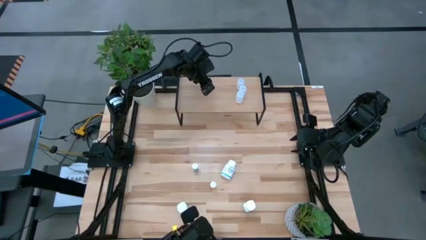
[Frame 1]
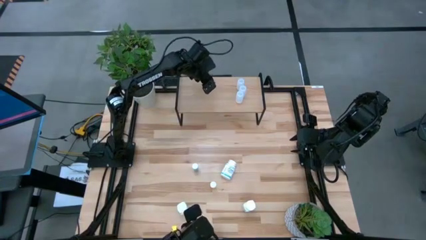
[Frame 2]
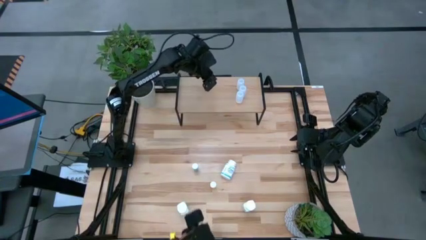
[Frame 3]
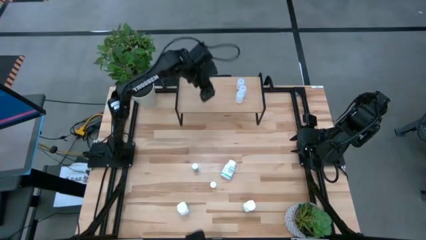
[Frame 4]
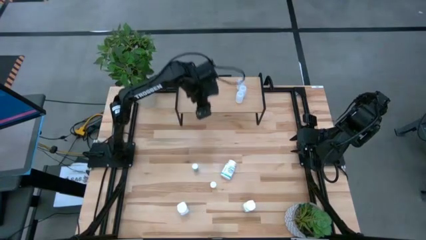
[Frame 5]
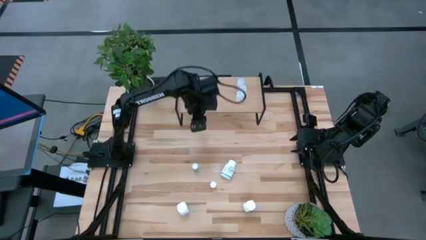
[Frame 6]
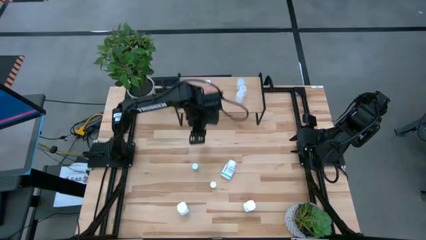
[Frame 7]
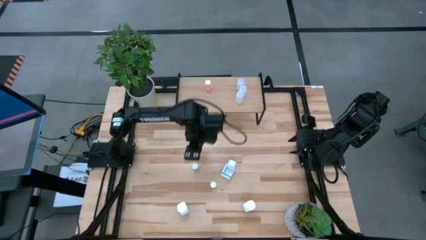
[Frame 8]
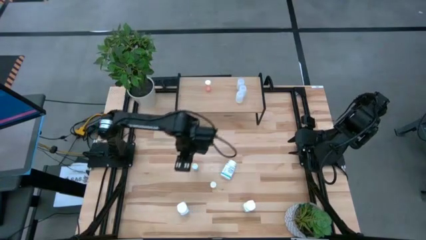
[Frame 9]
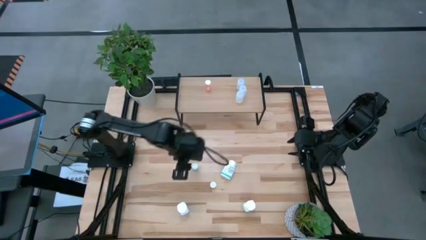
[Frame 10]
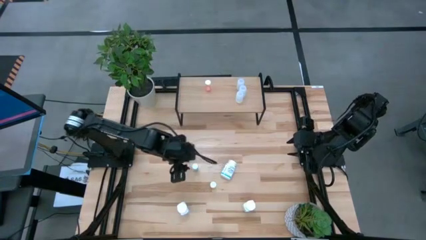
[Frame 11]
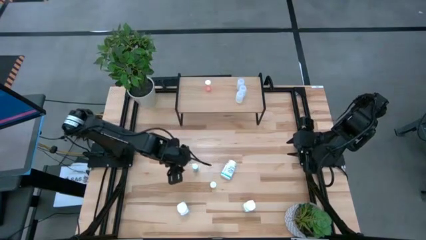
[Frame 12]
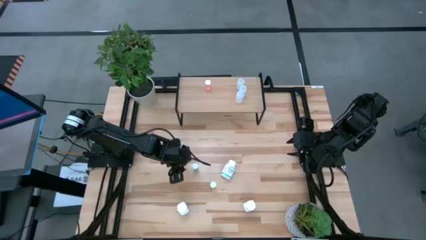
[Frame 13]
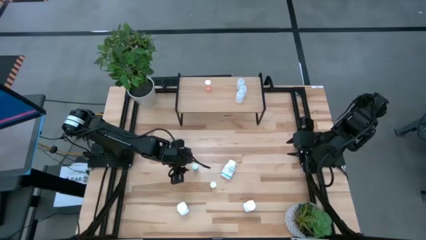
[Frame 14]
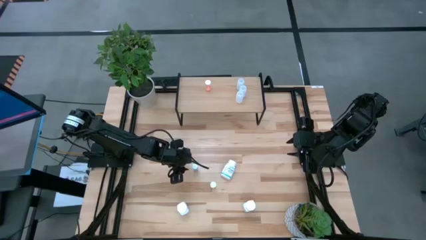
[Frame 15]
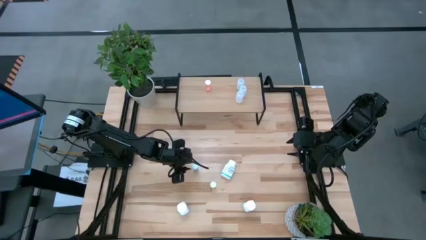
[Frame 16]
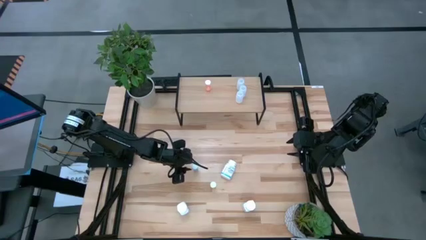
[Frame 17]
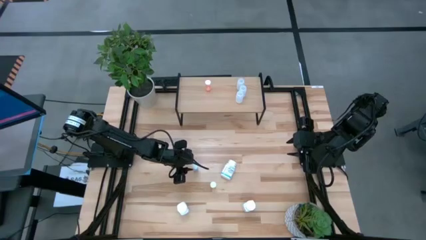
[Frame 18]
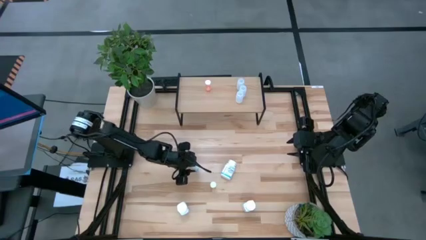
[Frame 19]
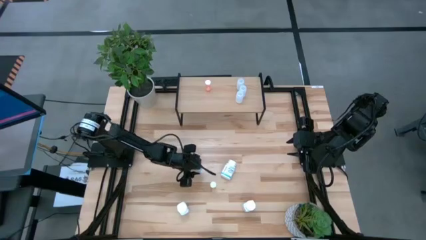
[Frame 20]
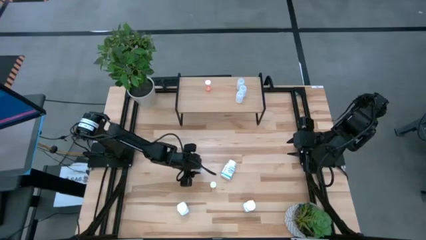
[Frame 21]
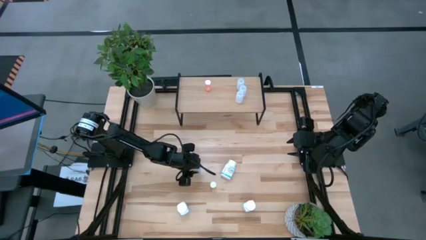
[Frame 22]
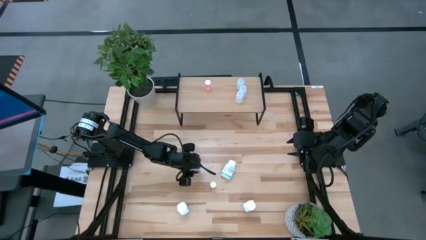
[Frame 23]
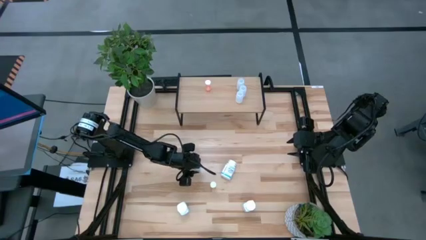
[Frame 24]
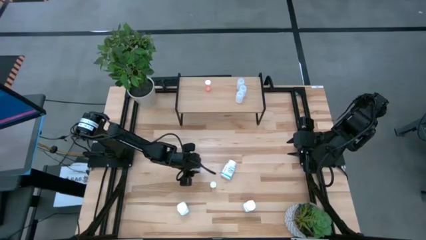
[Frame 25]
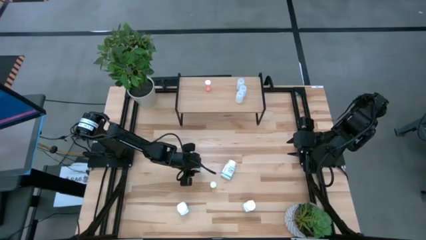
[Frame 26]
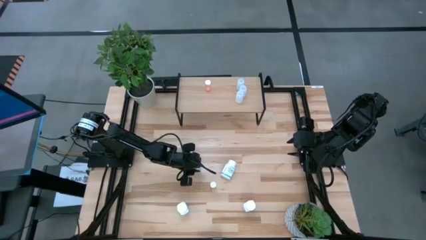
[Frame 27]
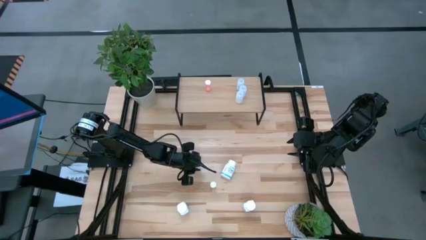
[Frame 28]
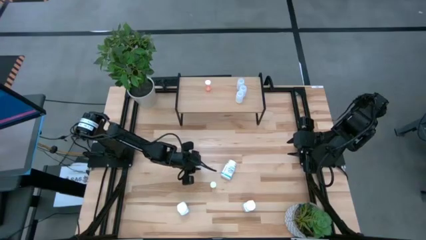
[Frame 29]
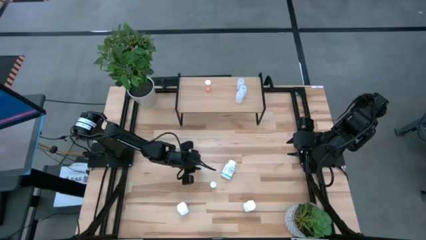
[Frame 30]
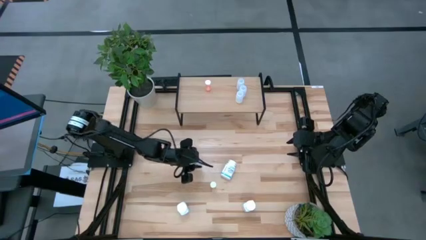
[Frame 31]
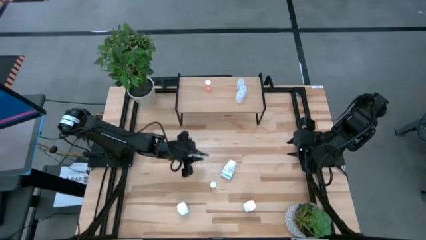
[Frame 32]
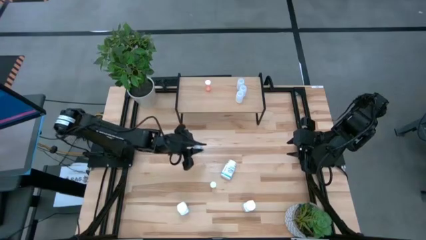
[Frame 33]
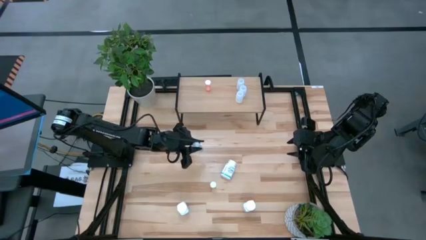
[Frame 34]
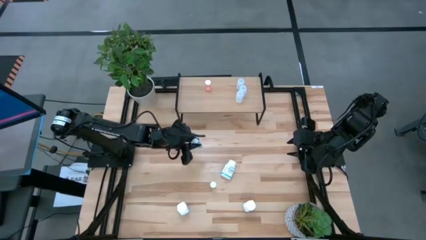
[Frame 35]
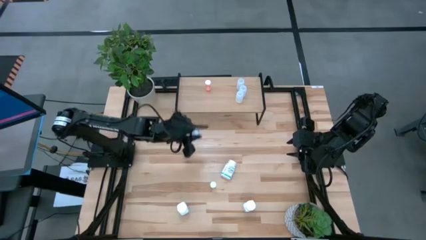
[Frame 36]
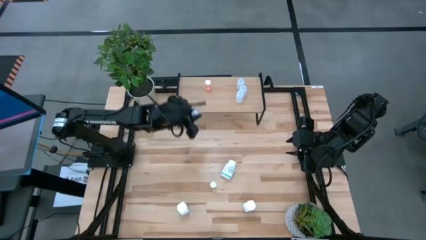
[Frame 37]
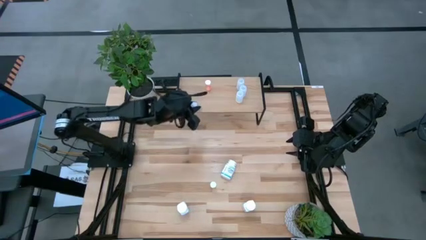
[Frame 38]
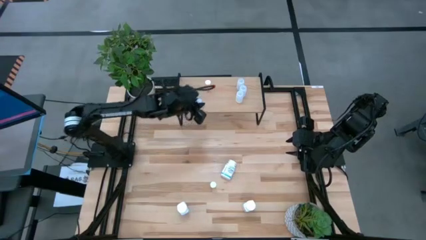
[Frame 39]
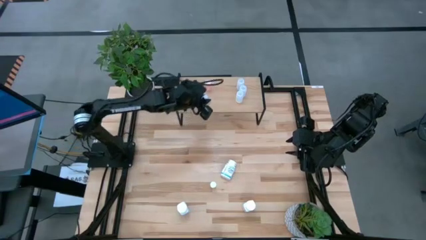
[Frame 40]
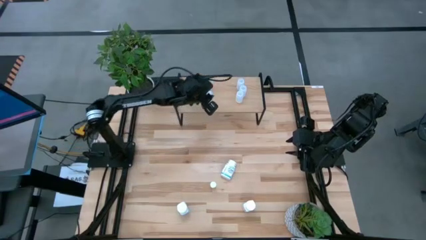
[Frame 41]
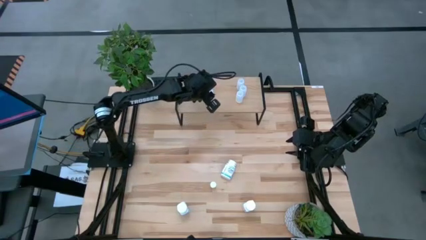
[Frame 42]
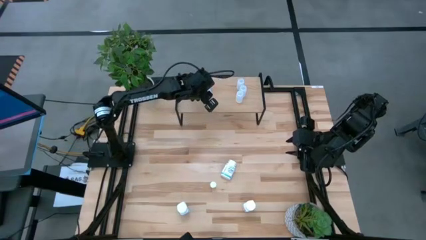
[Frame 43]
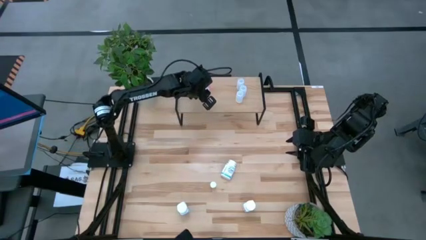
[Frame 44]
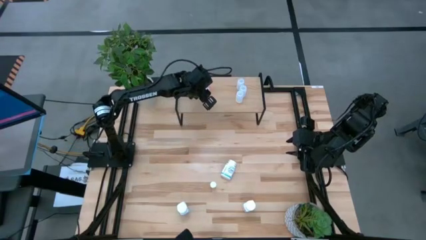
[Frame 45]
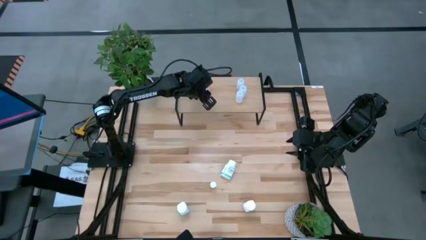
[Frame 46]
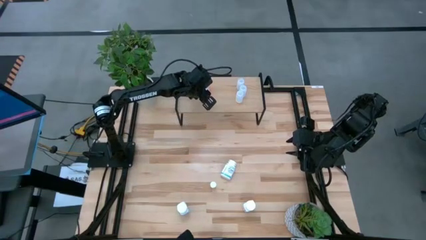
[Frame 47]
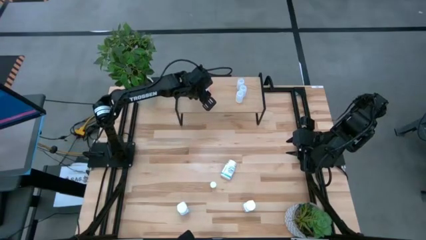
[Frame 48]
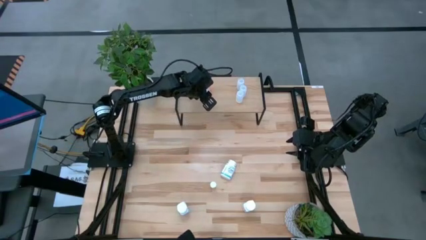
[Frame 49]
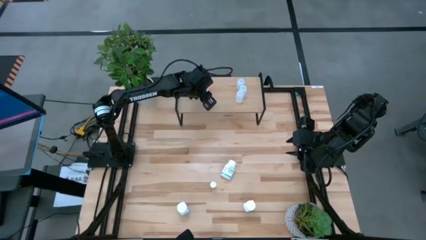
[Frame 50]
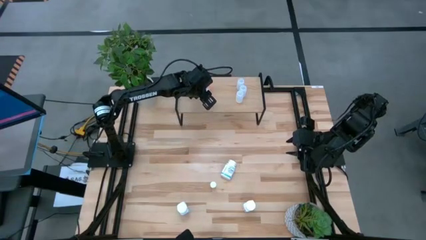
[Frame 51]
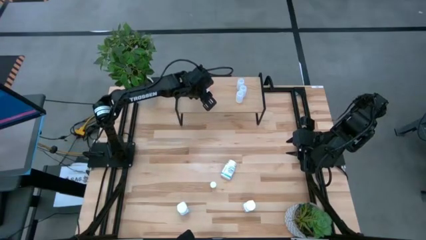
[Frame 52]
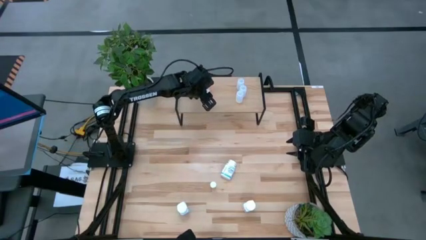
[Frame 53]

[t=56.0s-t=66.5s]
Task: Pick and place medicine bottles onto shelf by color
Put the blue pill bottle on the shelf

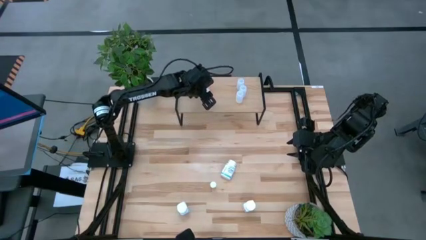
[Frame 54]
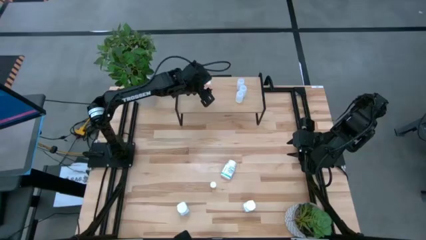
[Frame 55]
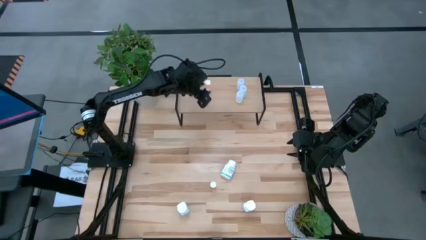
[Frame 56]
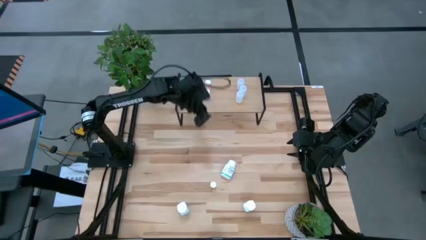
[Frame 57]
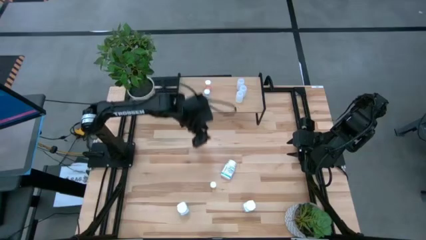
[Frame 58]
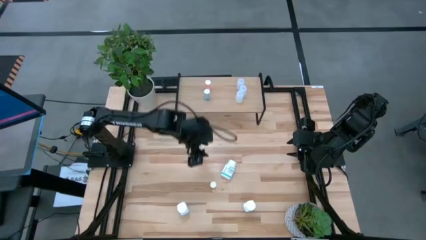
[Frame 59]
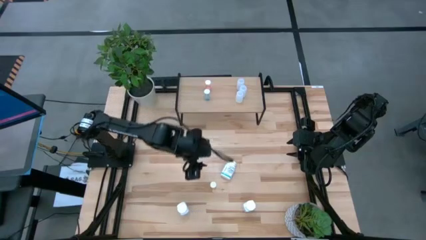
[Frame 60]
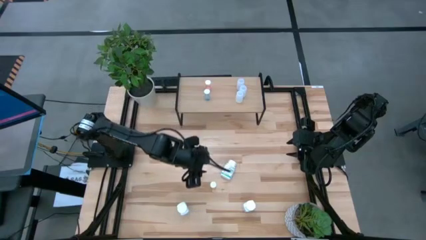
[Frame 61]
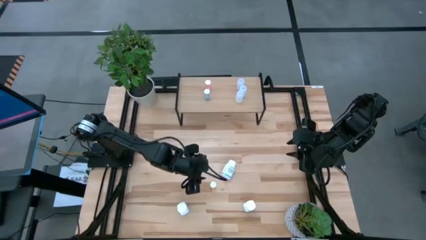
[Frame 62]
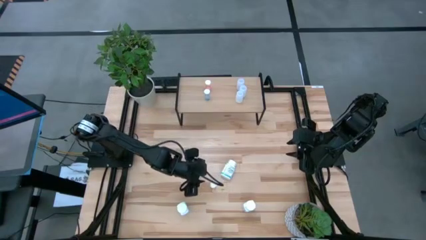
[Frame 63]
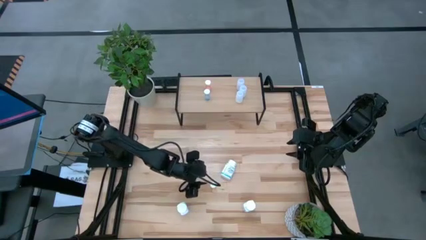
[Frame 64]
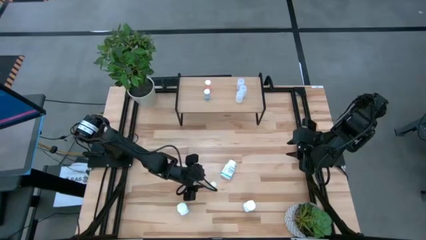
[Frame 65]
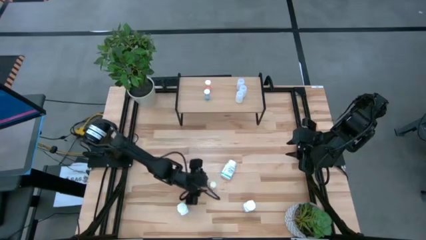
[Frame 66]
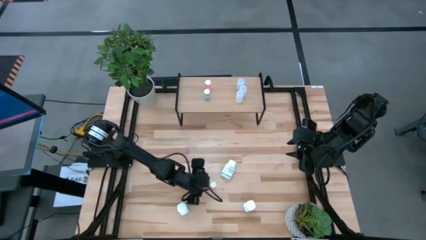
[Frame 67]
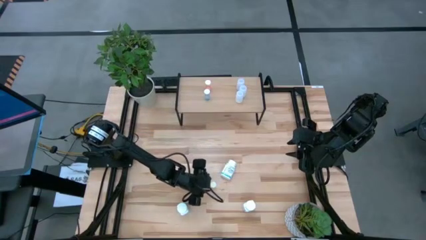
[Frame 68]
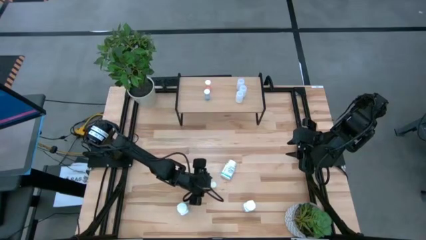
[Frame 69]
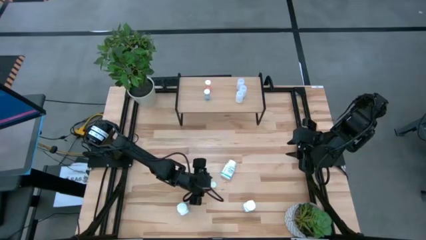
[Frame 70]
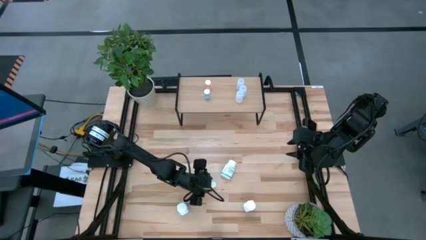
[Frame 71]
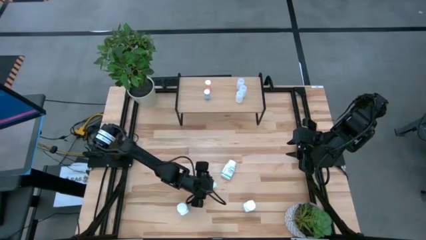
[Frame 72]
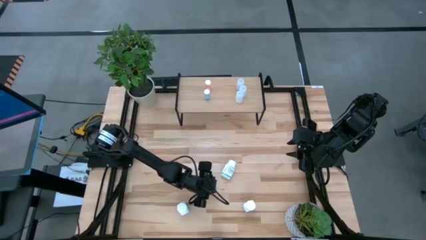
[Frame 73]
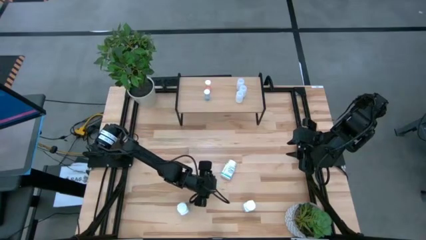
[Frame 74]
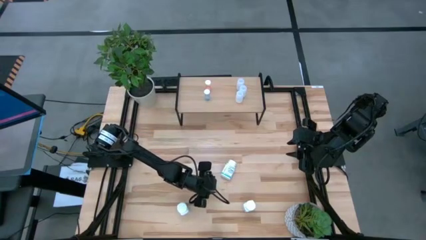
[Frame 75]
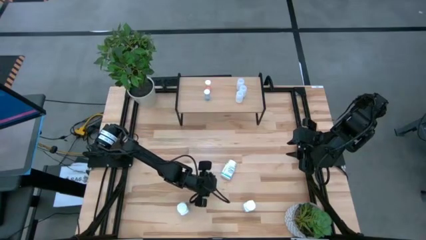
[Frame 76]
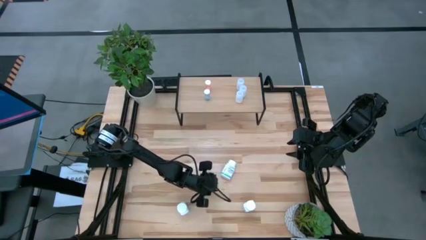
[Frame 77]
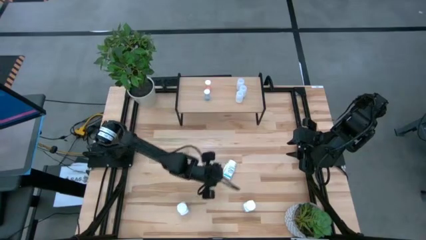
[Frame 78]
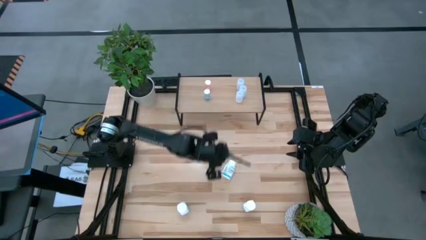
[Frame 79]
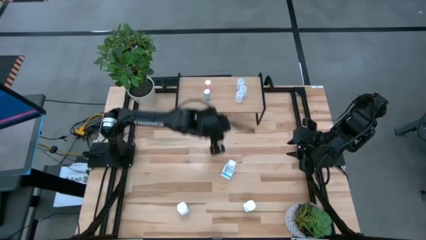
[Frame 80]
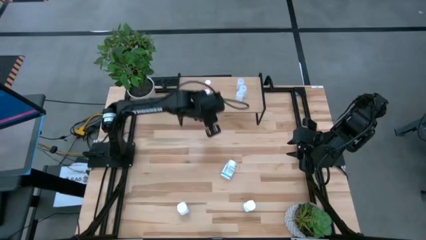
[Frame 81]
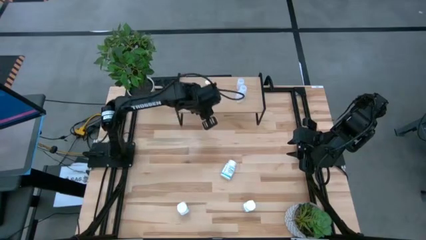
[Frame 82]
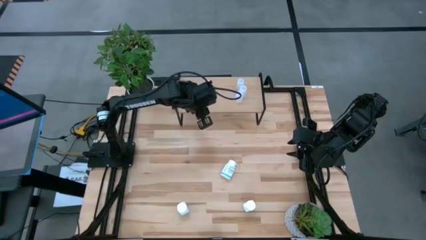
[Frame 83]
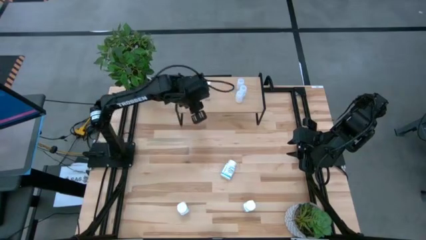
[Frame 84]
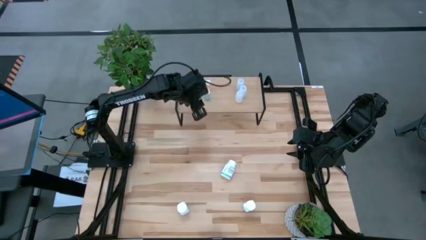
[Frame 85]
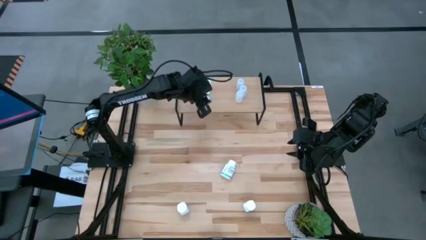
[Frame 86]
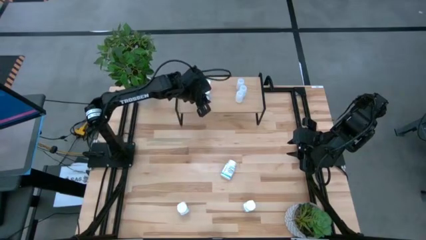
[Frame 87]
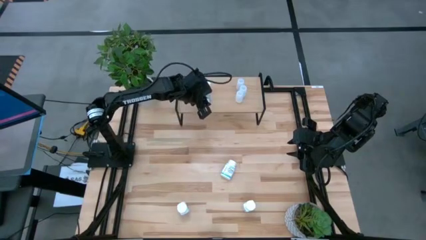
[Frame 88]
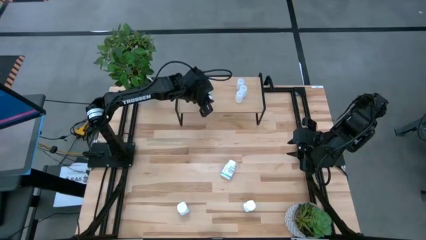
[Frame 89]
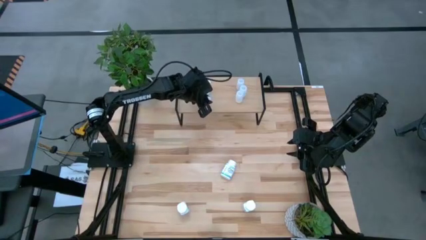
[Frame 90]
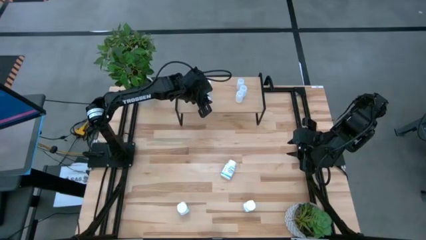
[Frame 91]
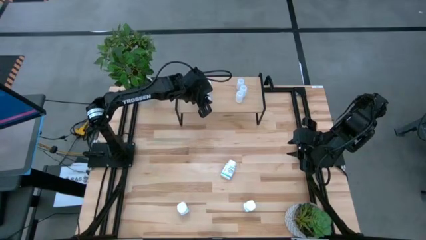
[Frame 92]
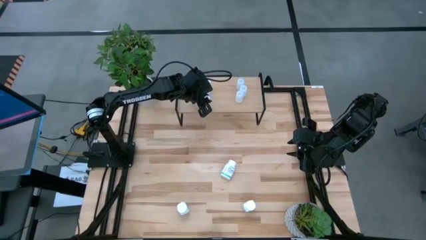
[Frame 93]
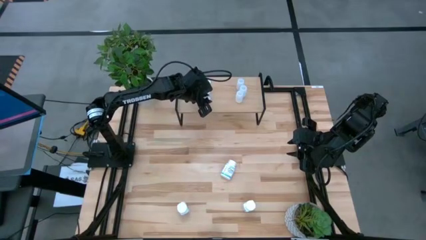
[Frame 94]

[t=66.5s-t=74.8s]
Put the yellow pill bottle on the shelf
